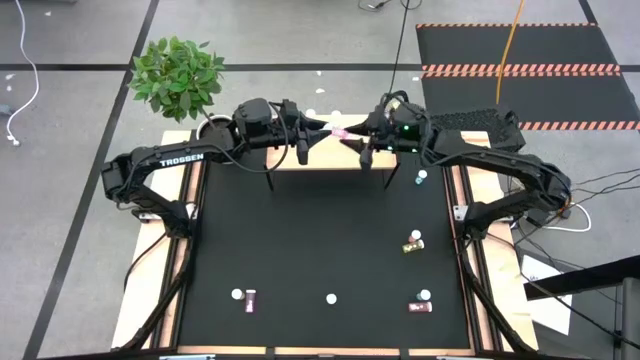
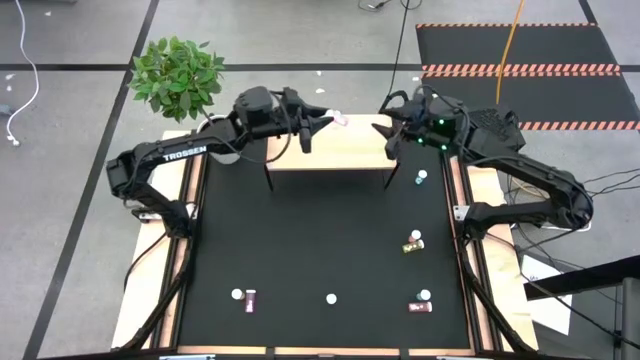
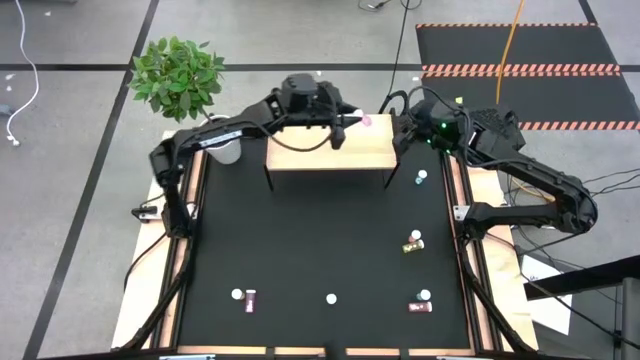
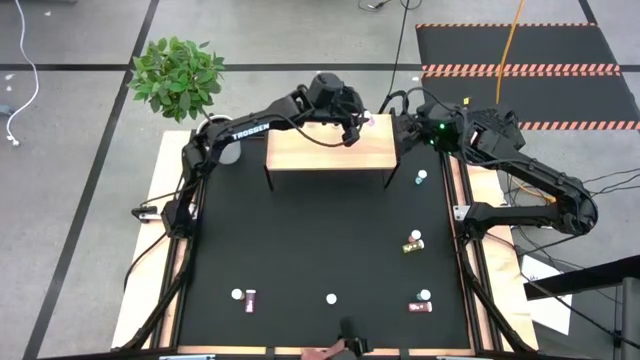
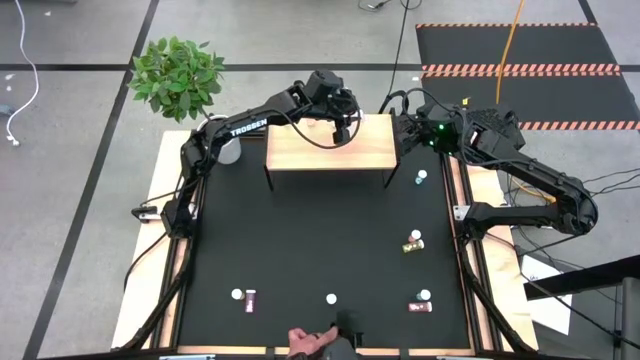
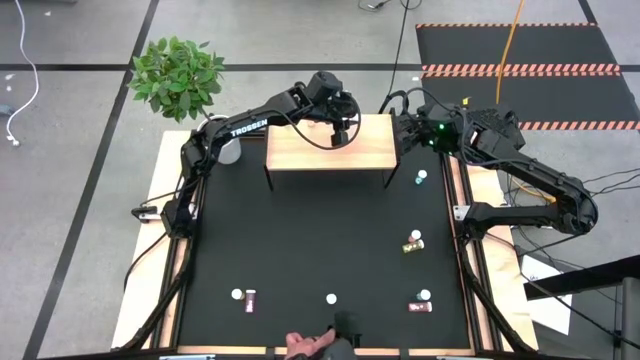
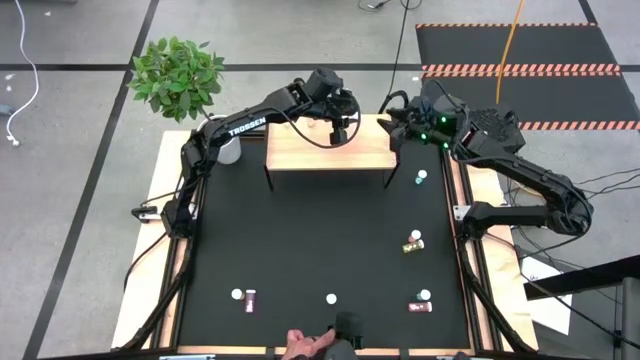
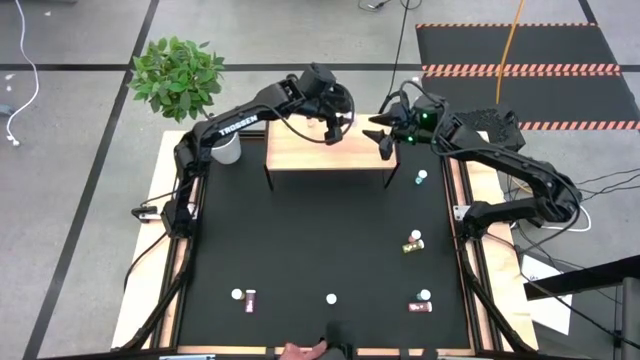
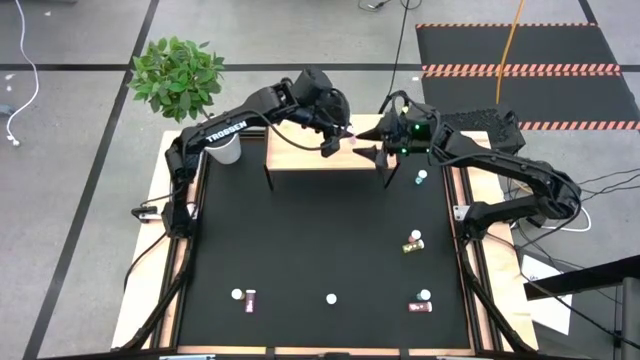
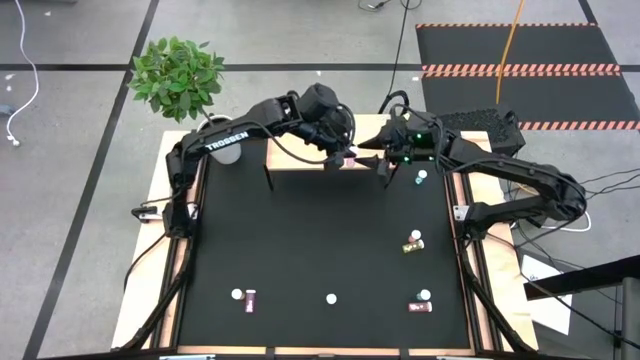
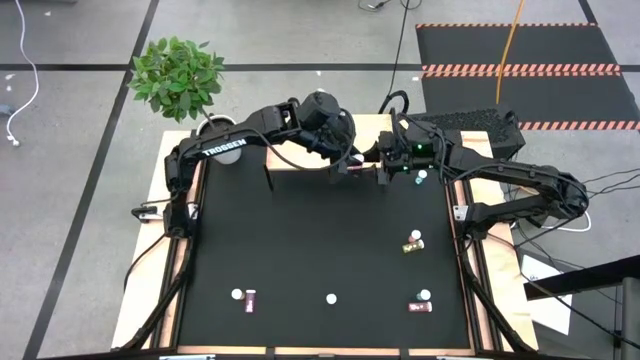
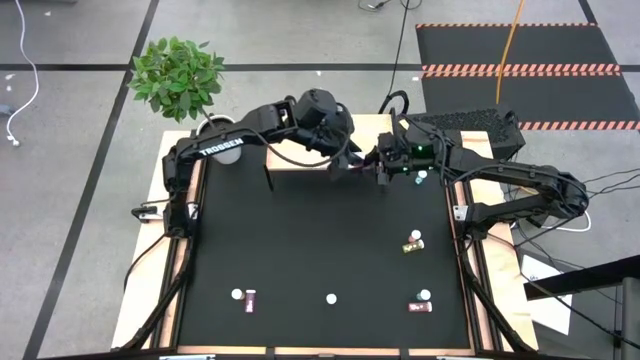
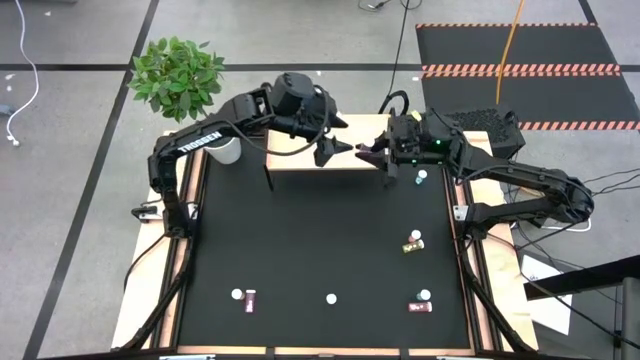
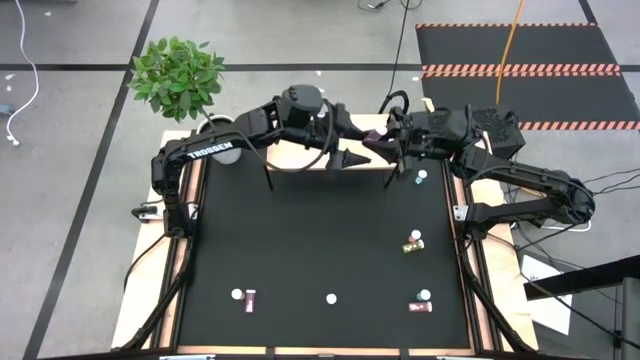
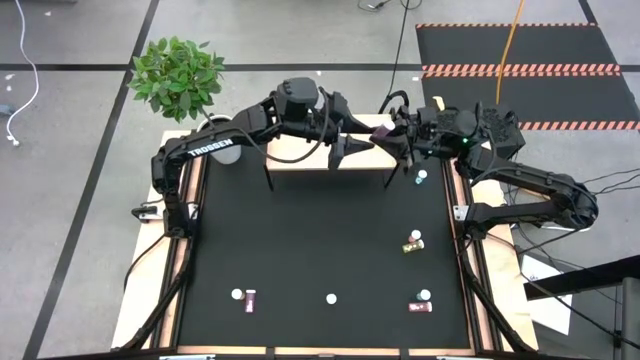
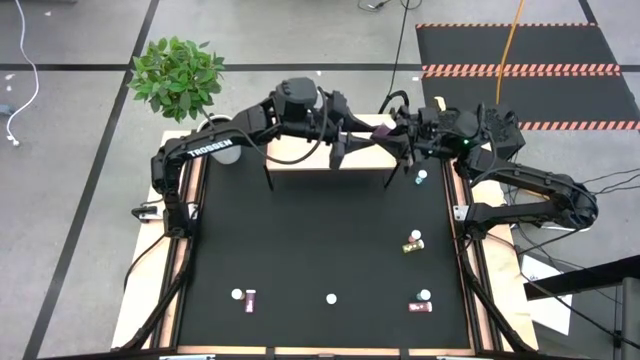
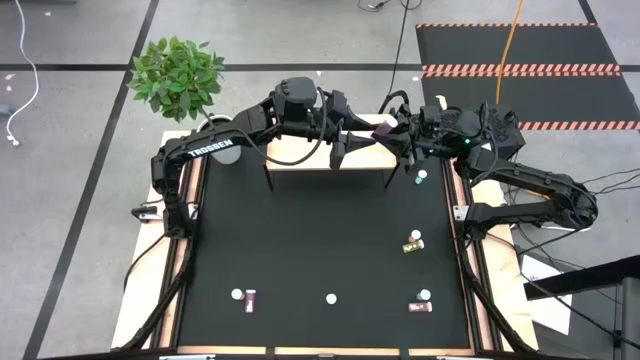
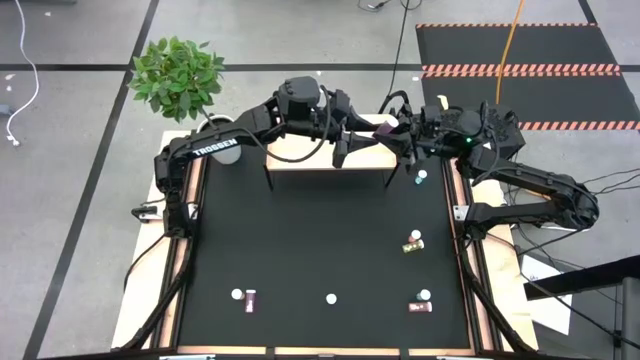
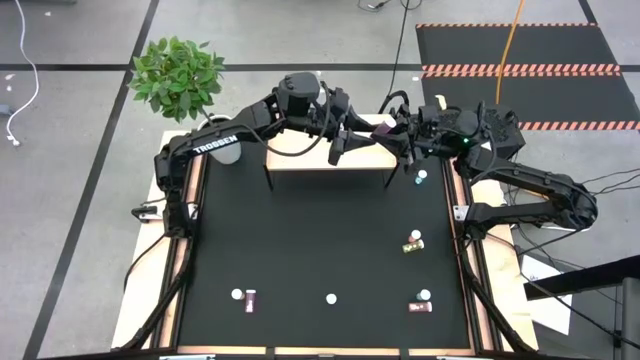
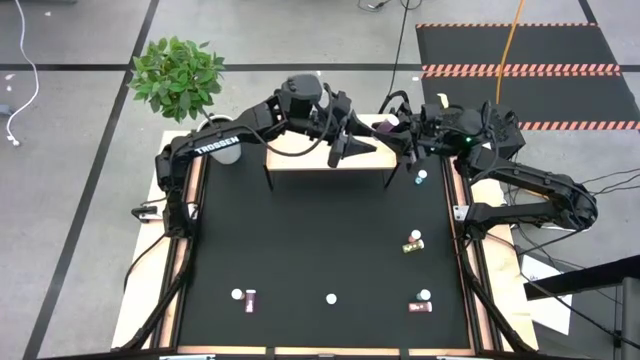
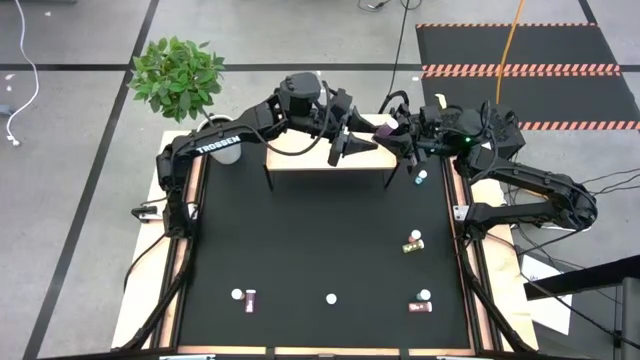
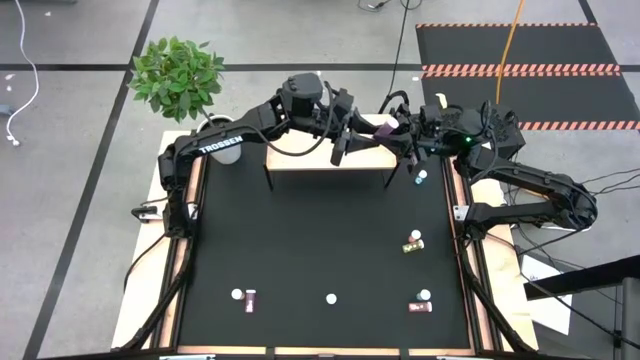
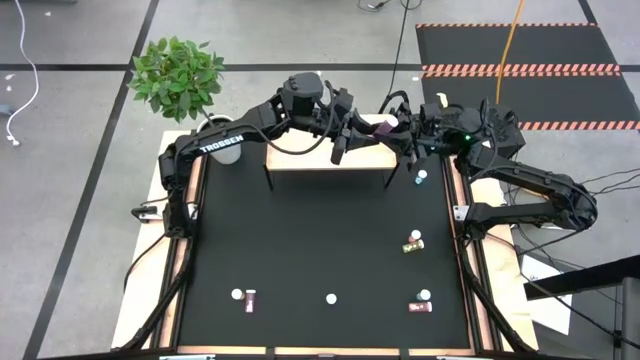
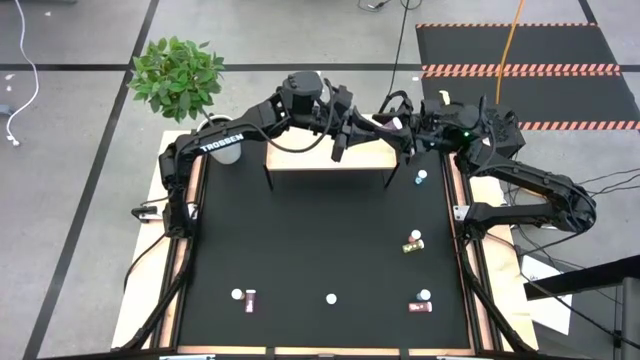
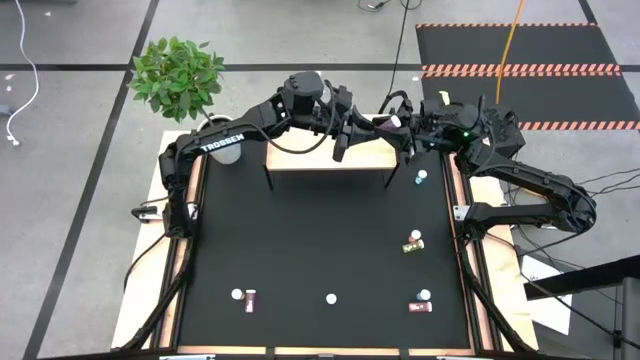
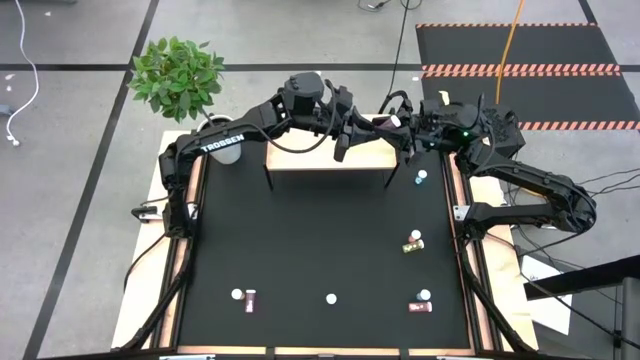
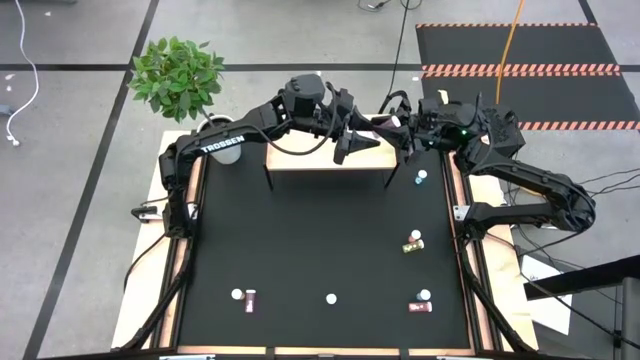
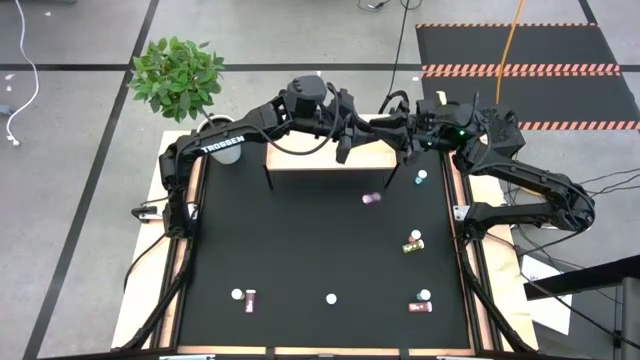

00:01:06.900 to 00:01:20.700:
Task: Pick and place medicine bottles onto shelf by color
Put the top pink pill bottle on the shelf

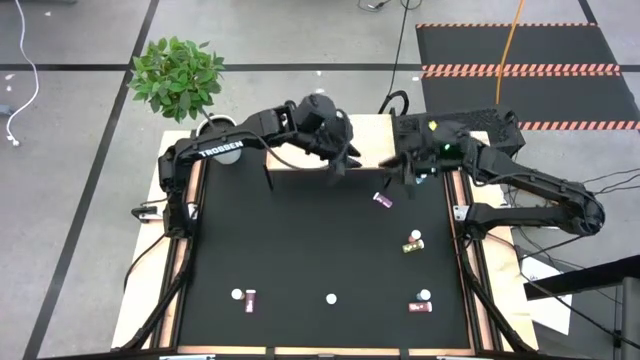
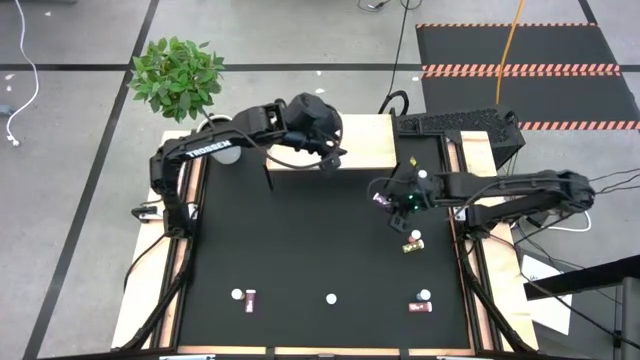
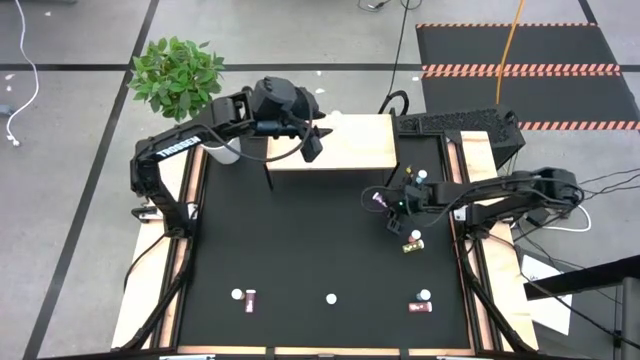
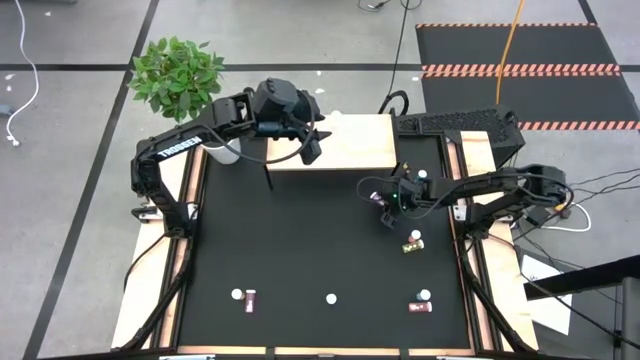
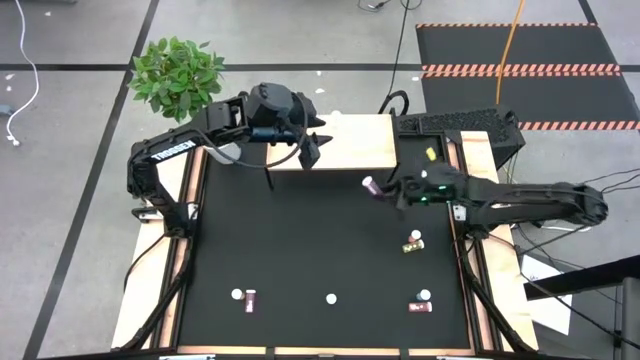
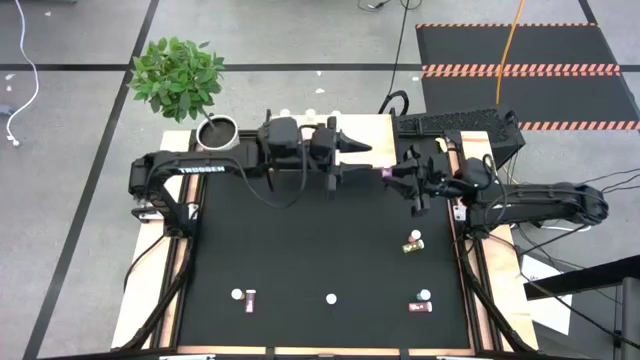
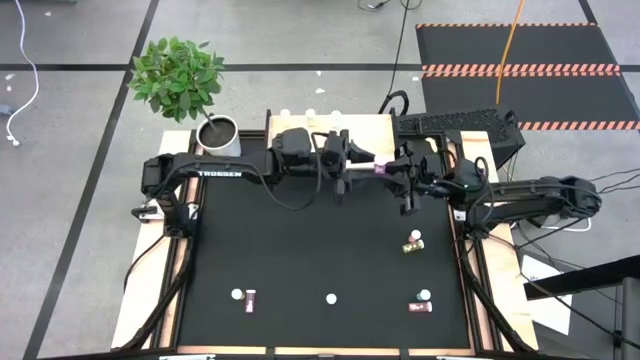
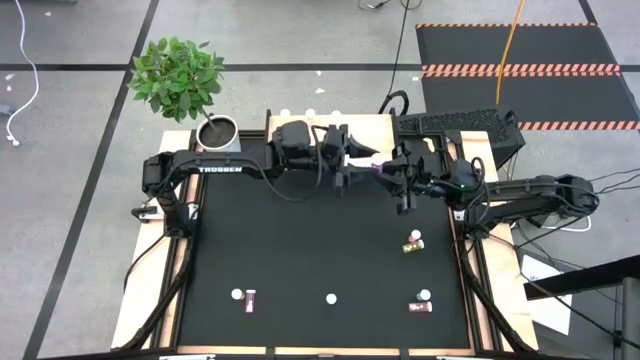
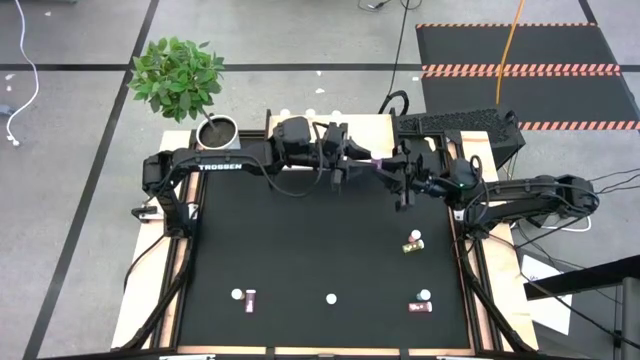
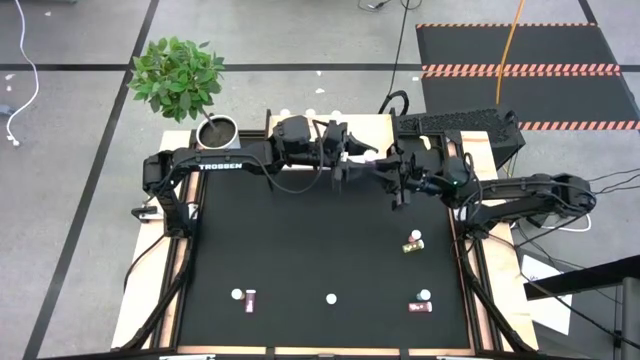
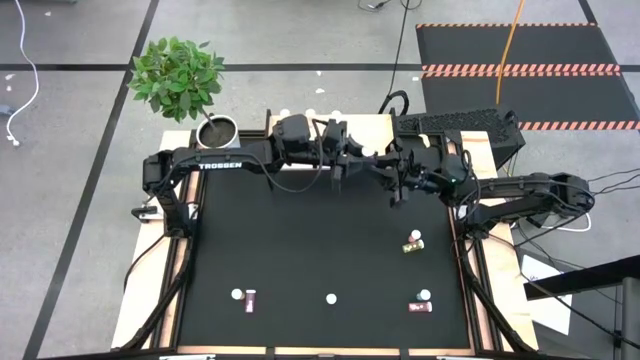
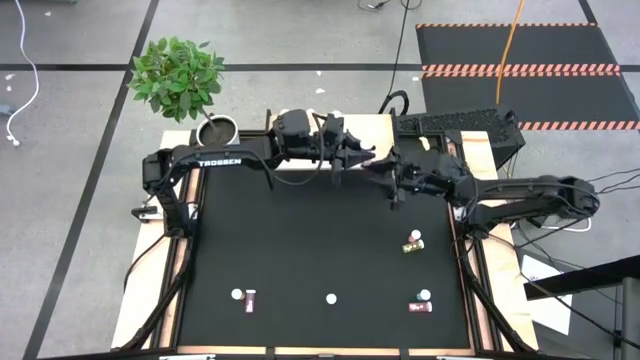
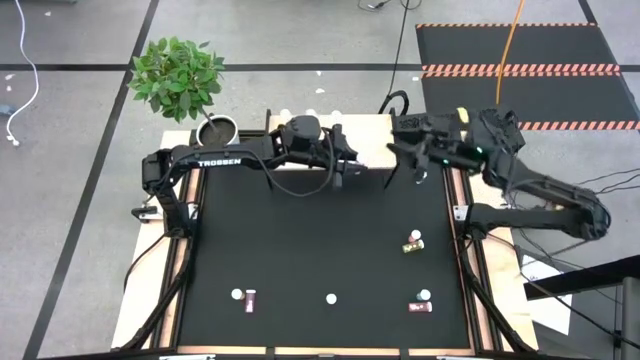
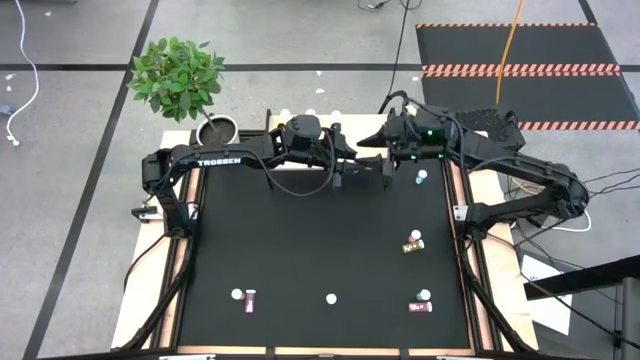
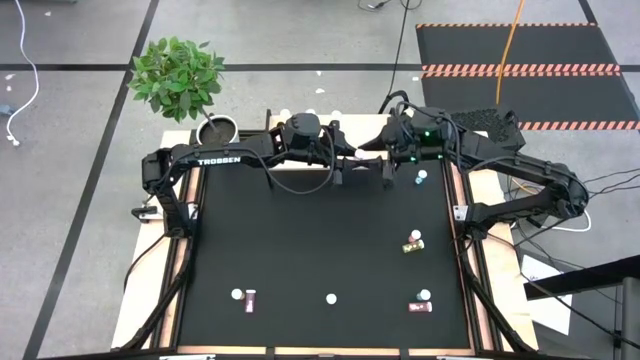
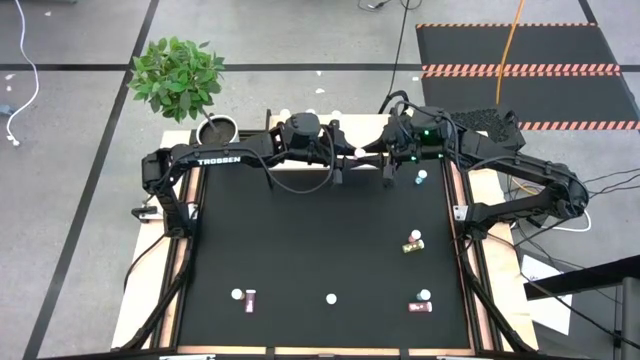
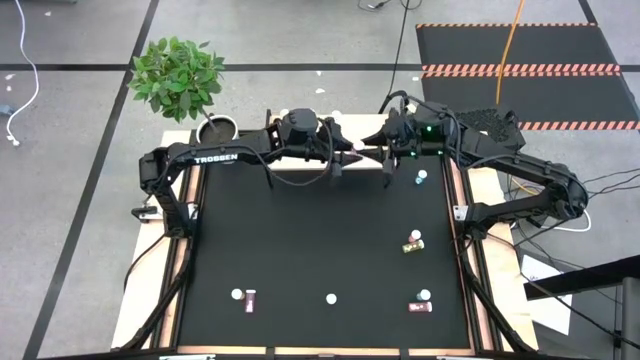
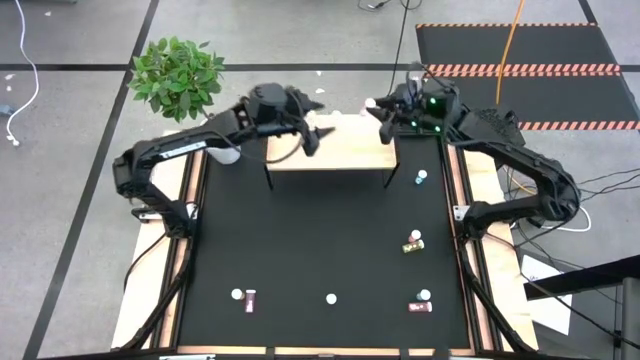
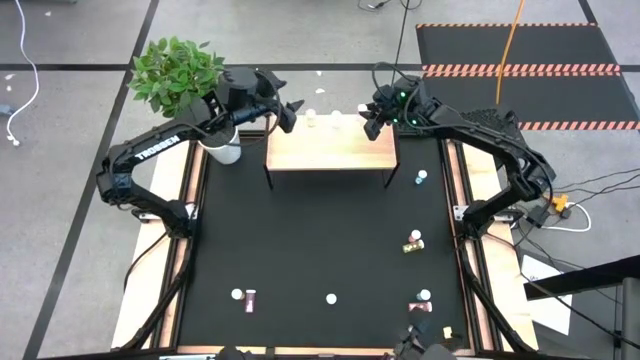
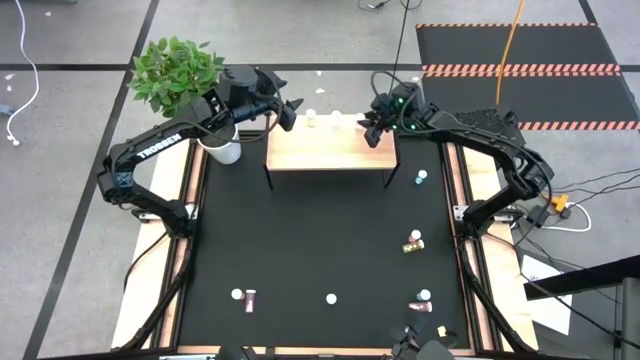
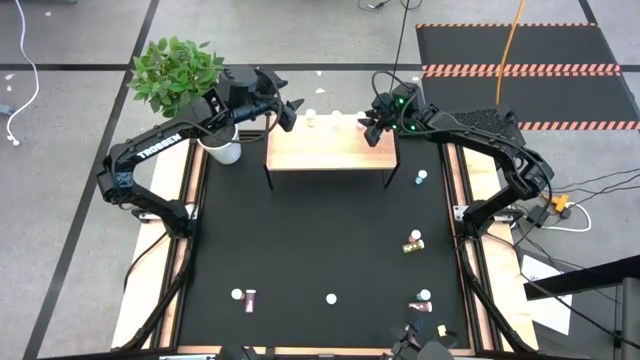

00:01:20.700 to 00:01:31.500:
Put the top pink pill bottle on the shelf
